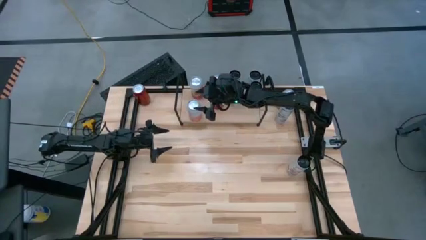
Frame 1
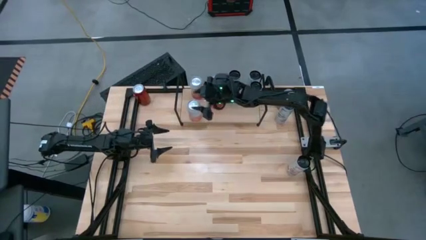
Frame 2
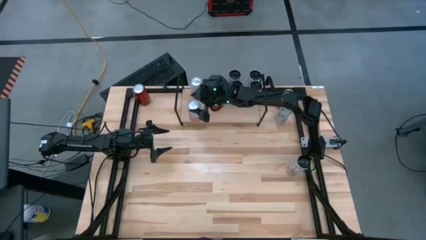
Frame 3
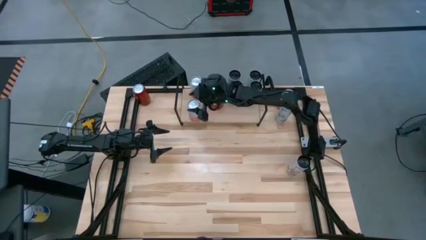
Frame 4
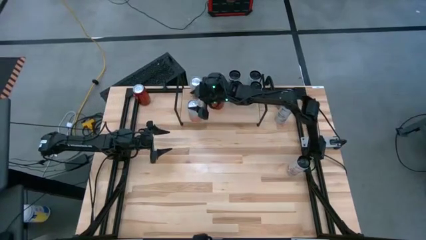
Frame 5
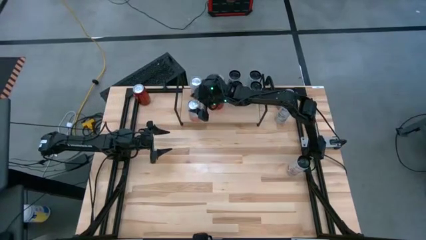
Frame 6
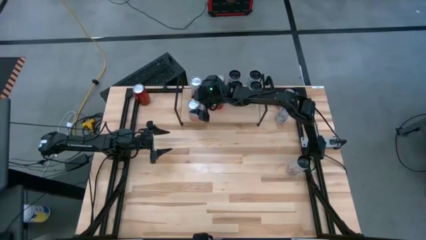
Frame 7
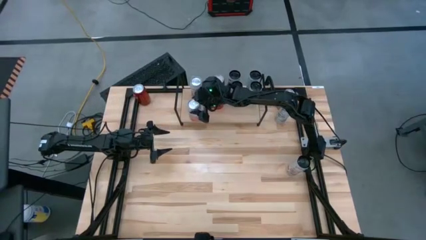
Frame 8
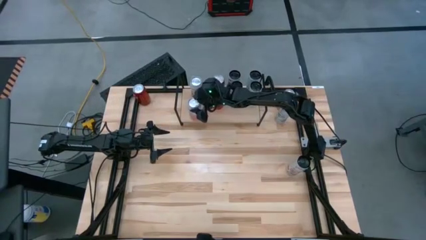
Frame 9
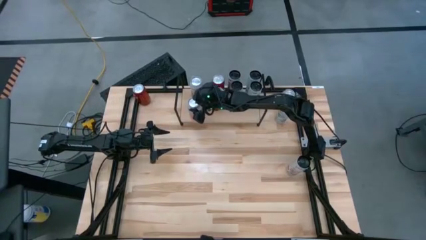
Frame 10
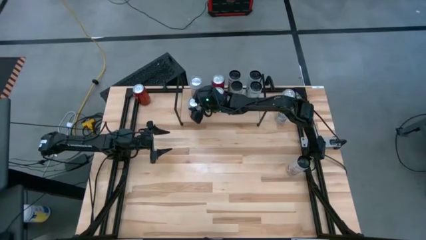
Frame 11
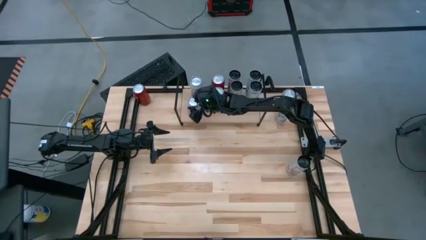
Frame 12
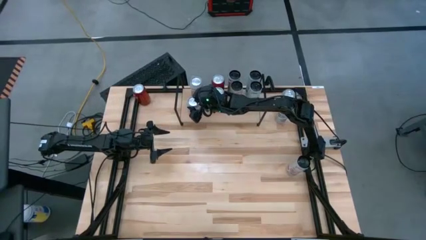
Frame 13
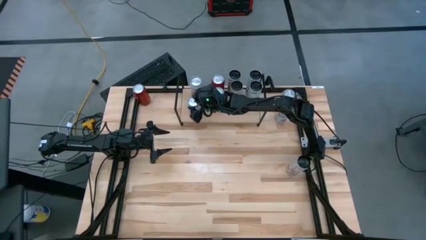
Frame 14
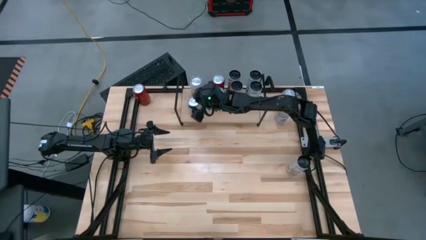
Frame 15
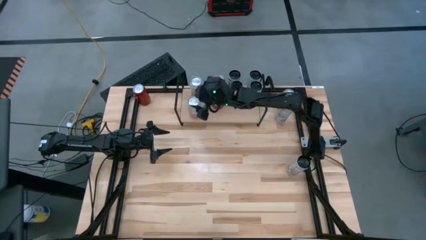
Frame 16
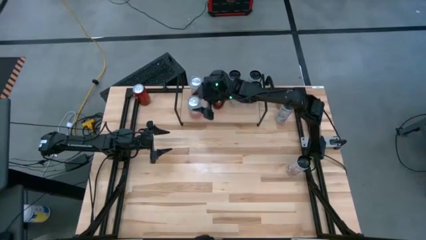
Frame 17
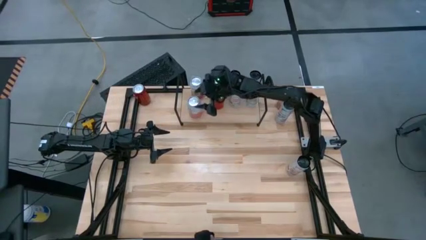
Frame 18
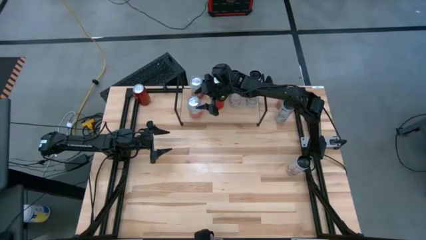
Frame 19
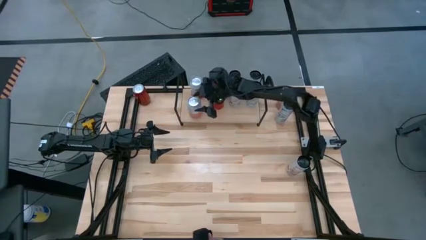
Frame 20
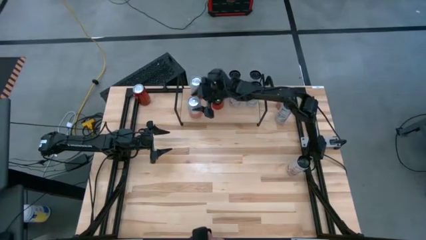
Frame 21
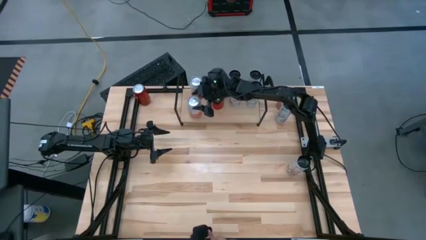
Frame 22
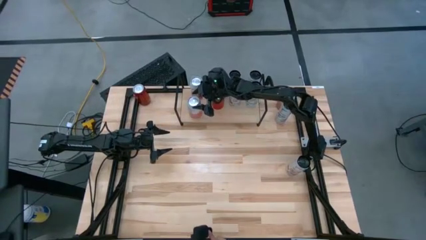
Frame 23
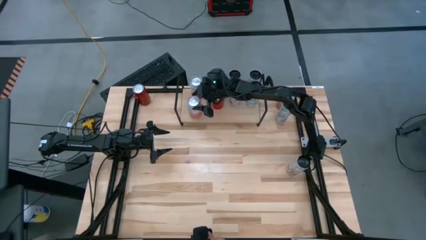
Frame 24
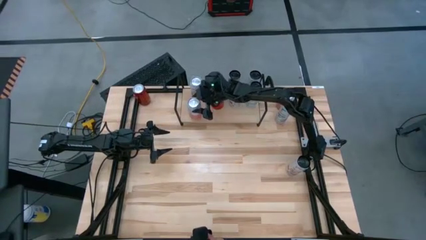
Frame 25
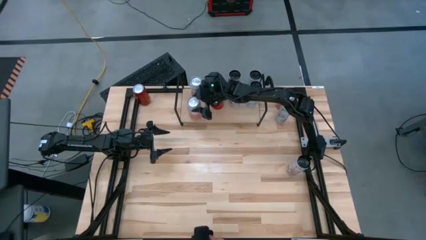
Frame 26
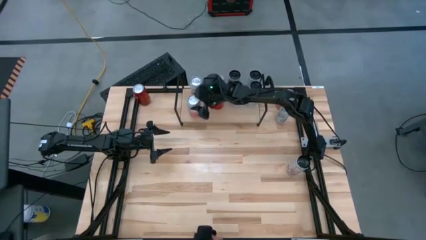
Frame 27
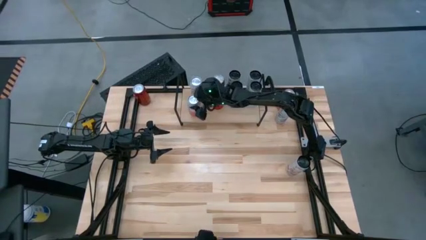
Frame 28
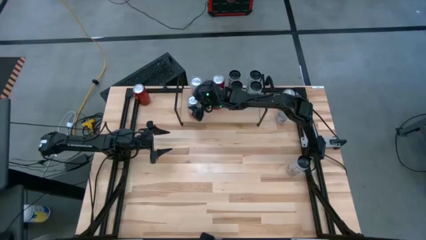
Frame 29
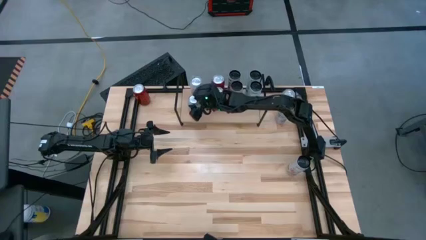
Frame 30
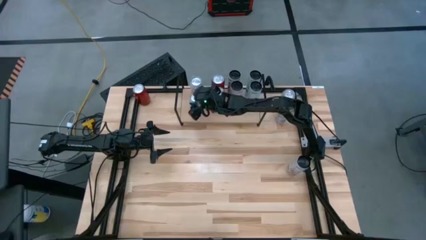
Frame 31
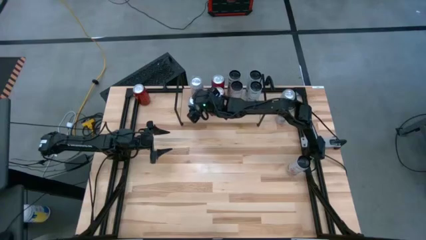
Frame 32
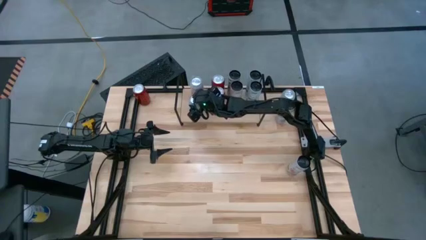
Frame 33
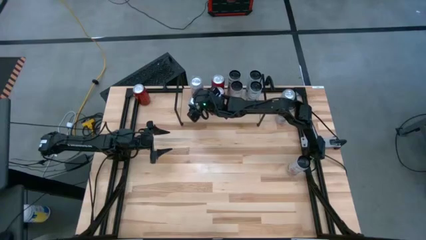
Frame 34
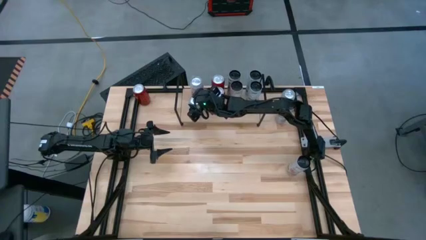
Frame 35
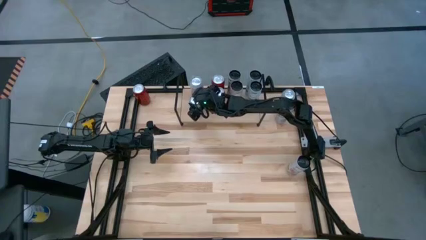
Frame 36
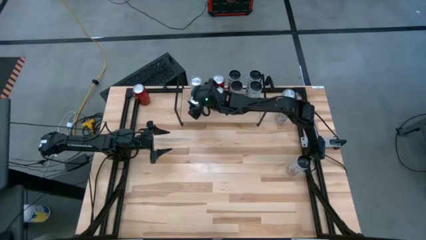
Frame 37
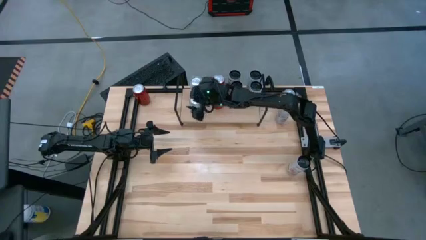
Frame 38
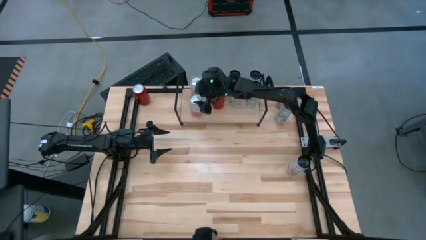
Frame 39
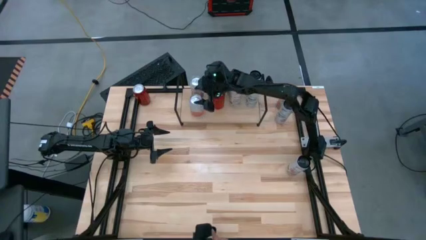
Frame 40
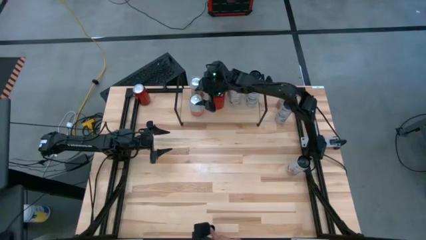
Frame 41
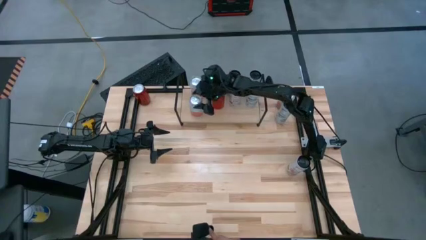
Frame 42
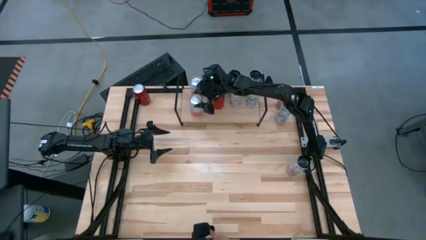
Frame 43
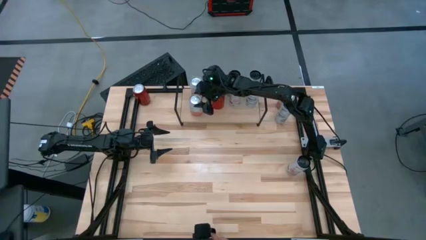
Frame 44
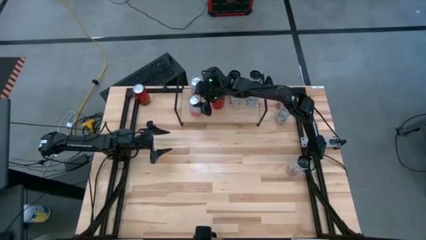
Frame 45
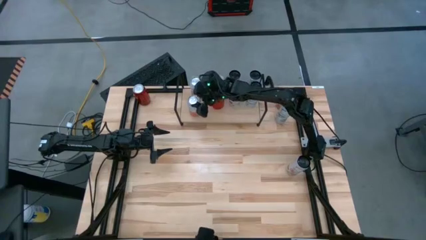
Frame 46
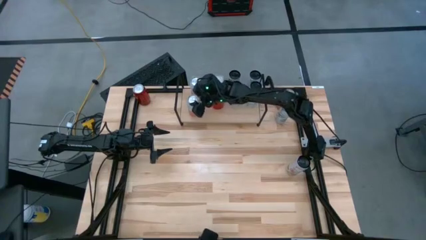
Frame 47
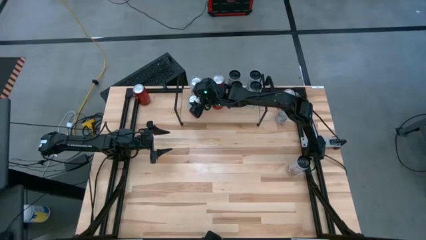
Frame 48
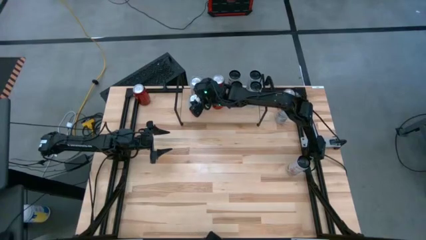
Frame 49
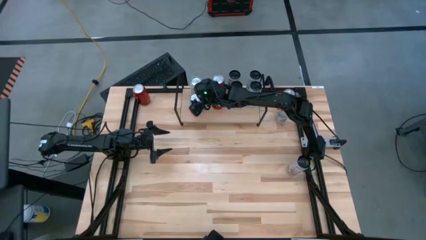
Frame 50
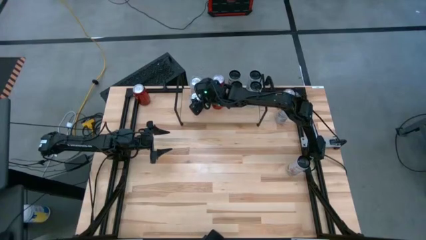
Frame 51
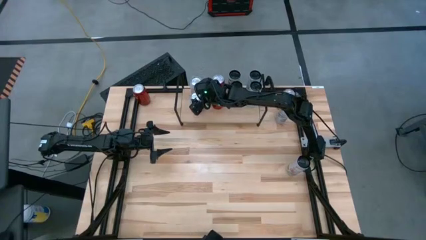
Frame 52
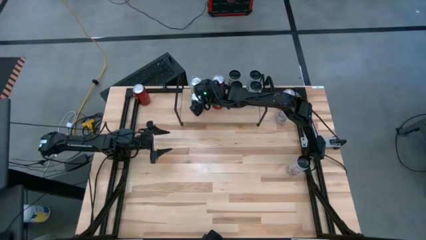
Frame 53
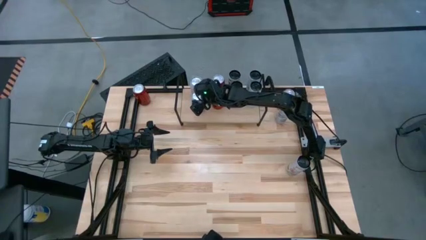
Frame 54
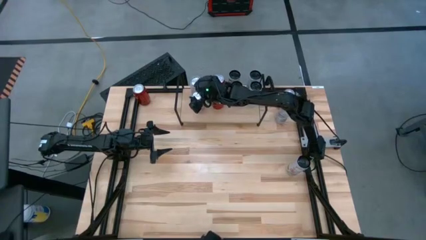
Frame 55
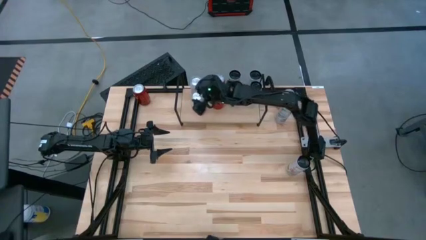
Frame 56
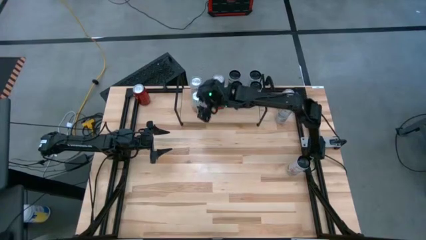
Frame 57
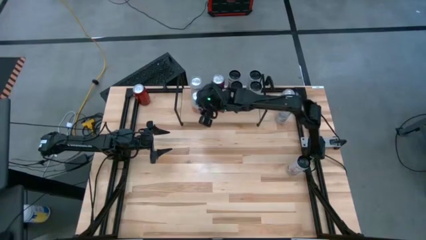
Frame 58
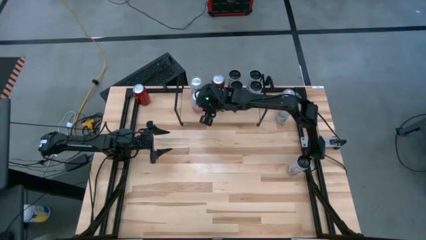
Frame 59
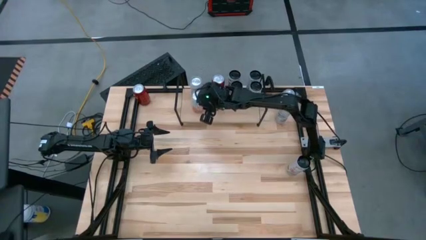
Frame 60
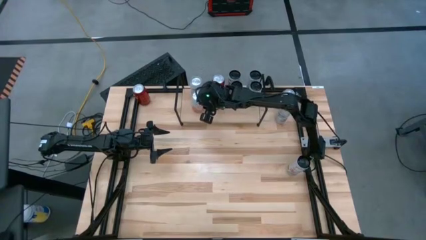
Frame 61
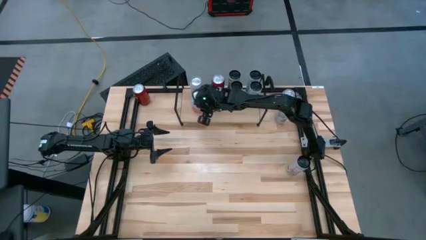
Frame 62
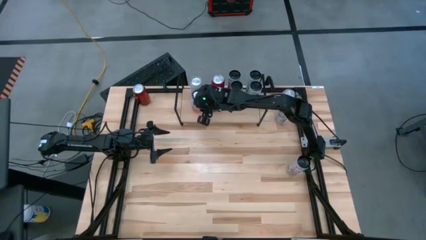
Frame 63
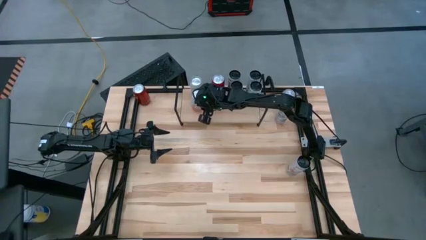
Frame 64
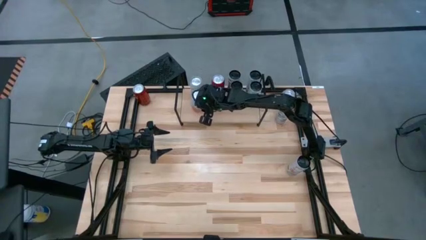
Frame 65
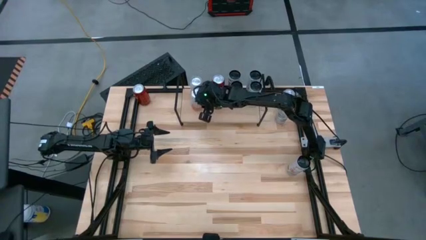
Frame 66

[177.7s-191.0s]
Task: Place canned beverage on shelf
Put the bottom orange white soda can on the shelf aligned with the pink white soda can

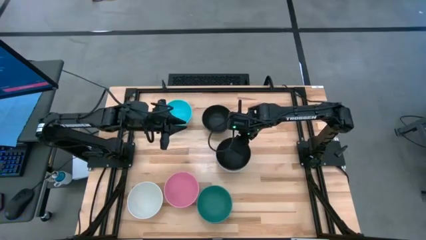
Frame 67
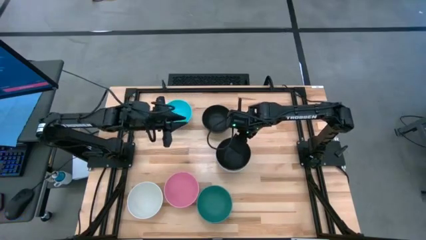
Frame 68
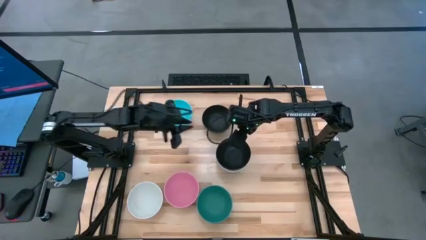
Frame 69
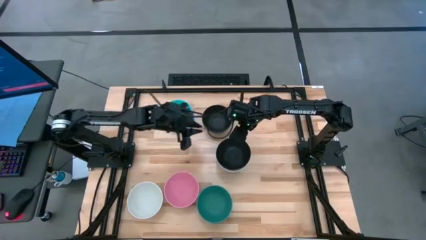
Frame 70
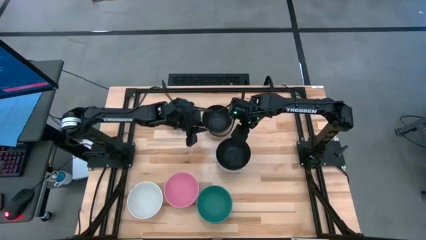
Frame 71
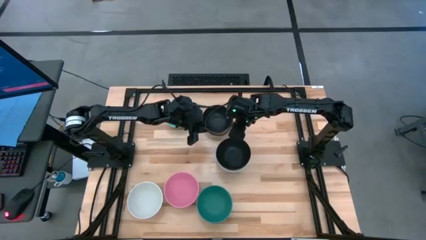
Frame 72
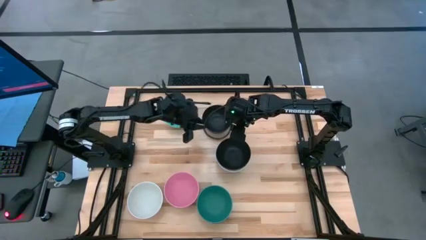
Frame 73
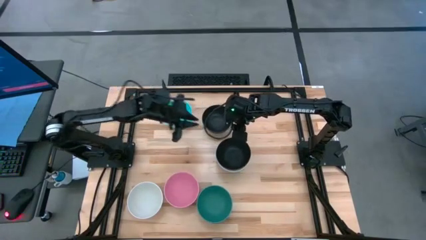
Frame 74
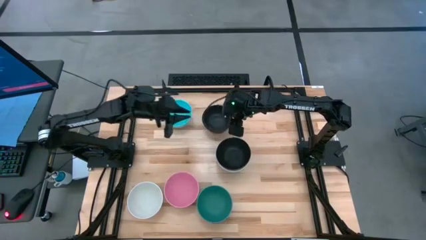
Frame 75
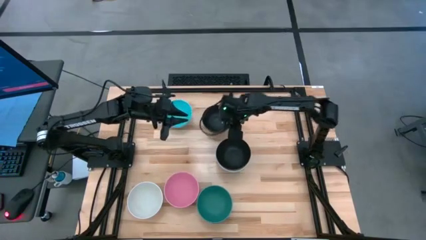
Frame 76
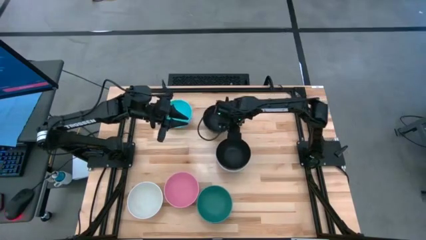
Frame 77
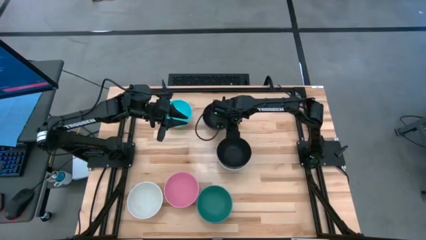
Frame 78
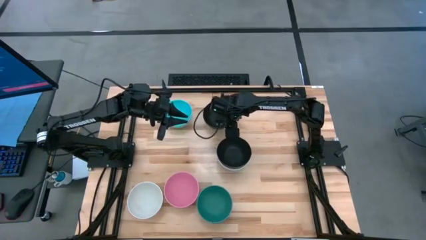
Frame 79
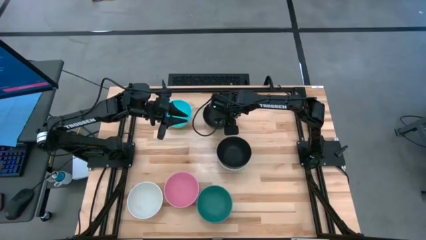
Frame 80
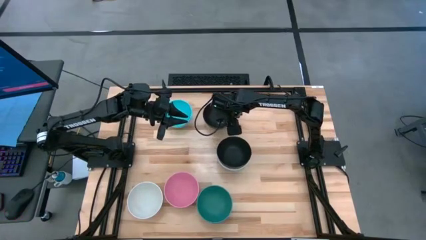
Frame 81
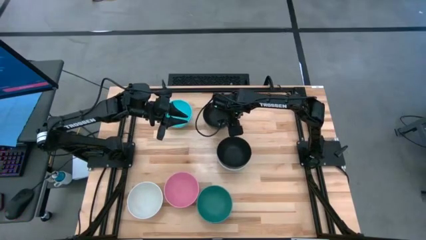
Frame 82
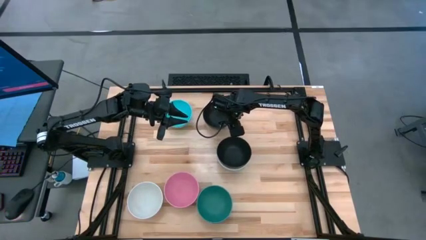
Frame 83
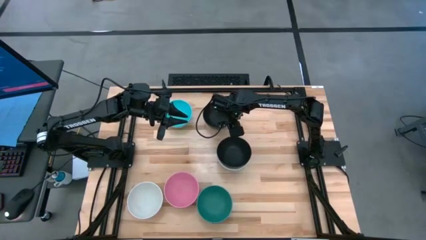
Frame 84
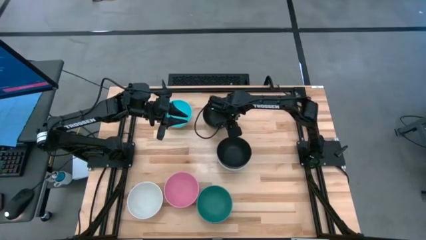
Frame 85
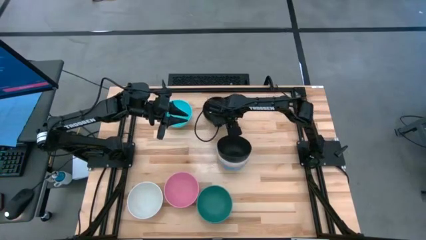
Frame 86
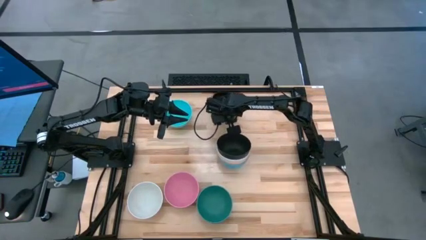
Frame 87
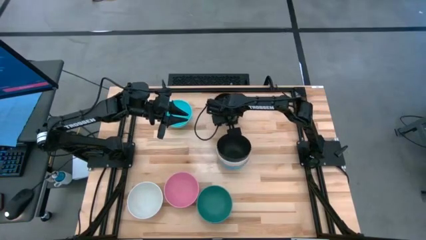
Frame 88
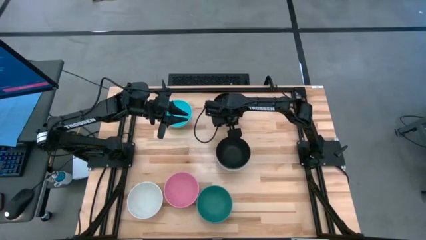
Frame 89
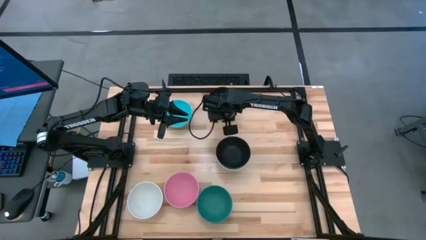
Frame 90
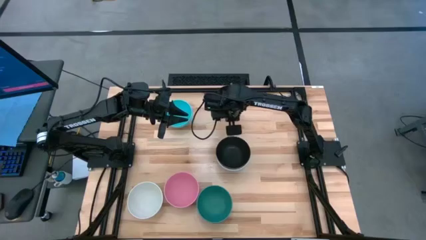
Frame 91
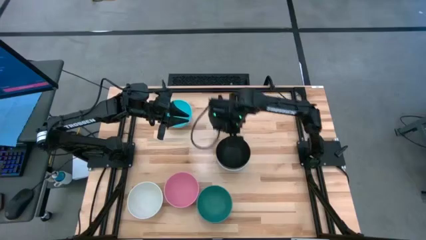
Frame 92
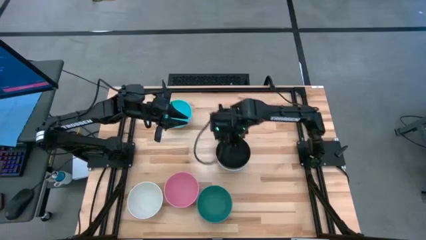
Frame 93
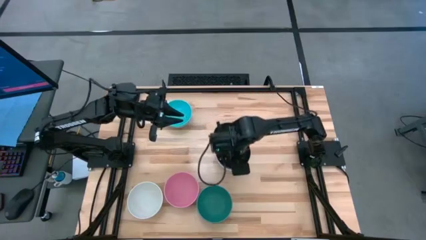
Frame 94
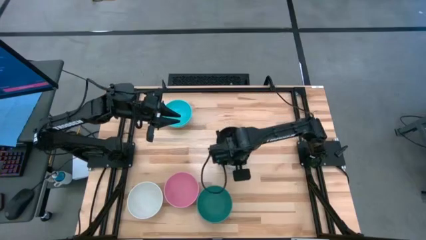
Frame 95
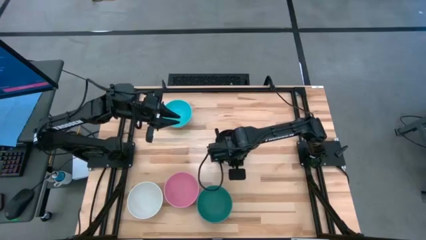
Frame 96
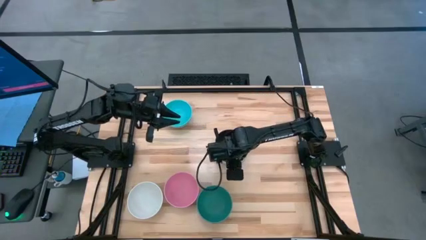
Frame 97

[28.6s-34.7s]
Task: Nest bowls inside each other
Stack the top black bowl on top of the bottom black bowl
